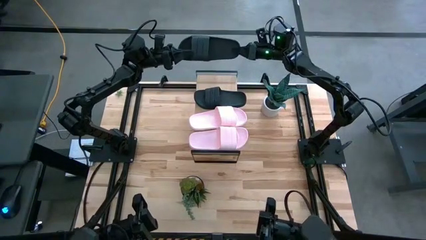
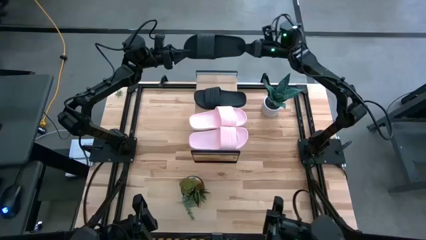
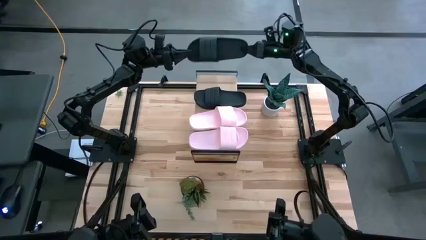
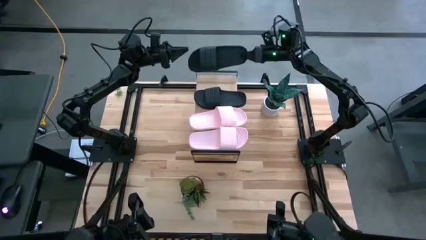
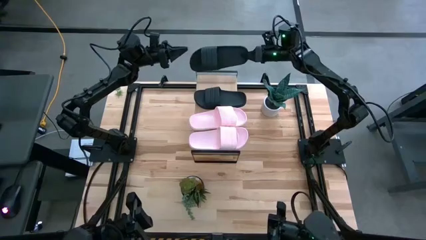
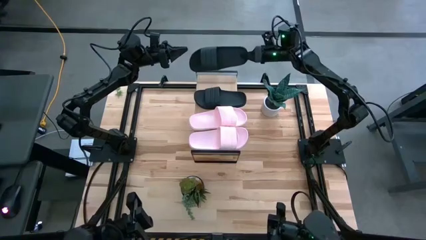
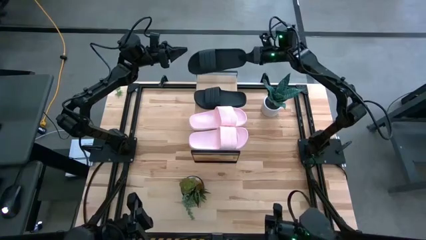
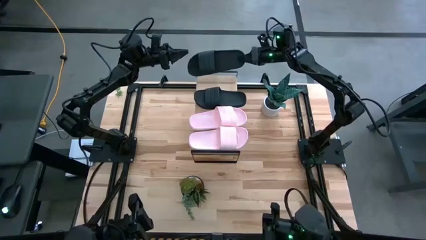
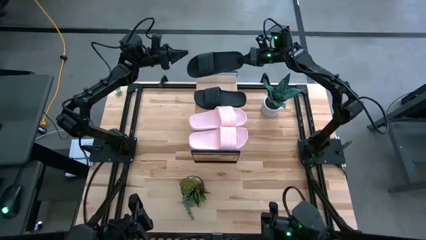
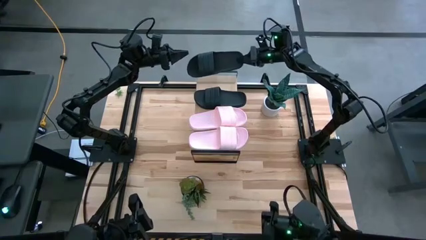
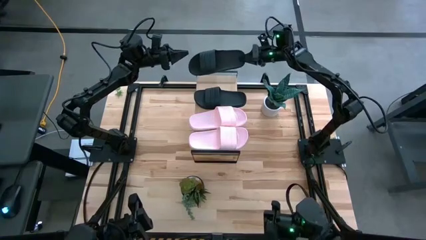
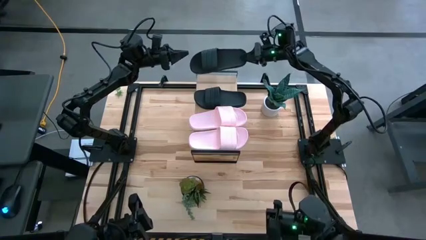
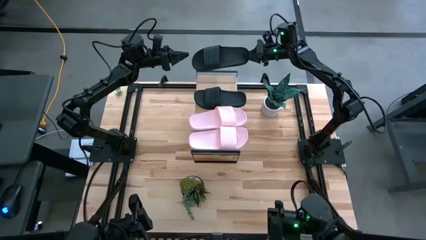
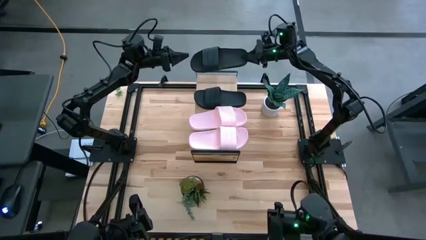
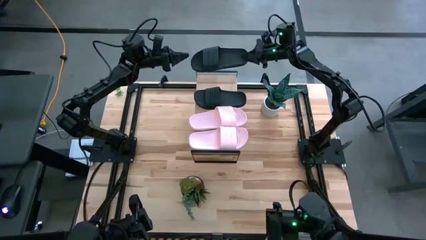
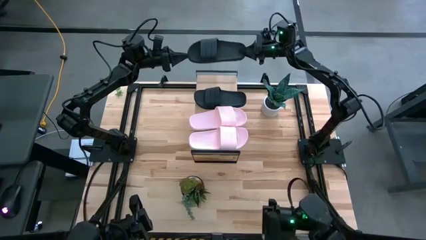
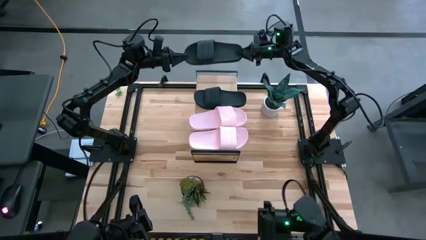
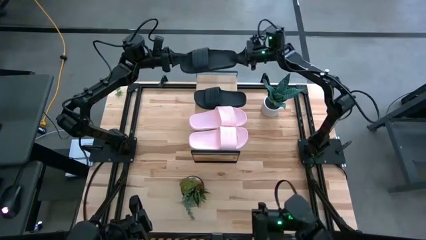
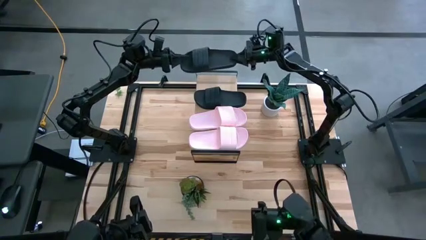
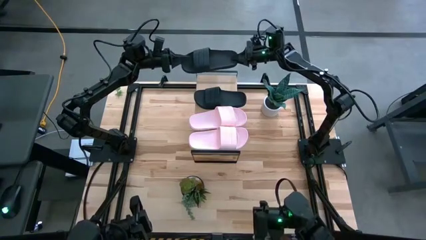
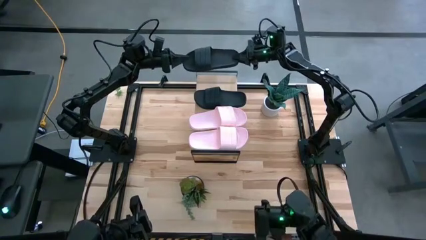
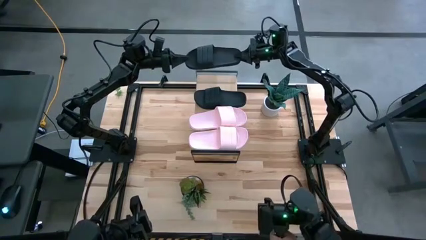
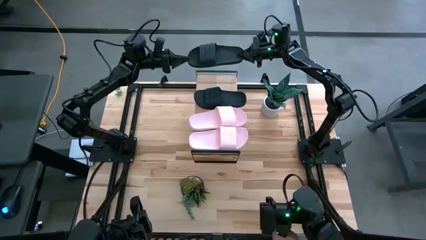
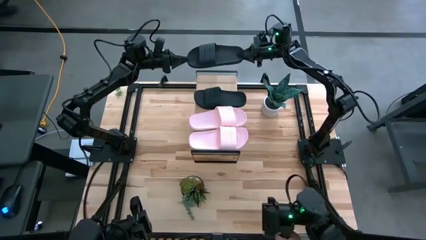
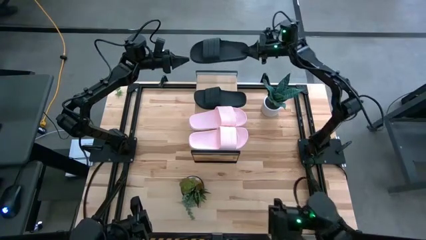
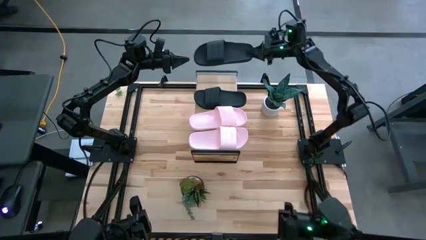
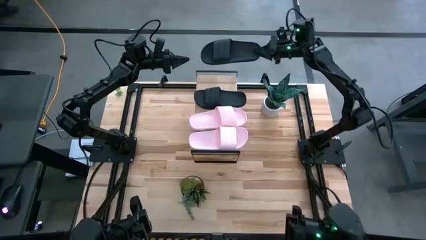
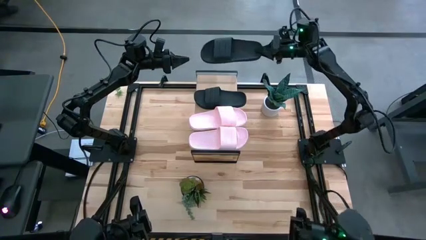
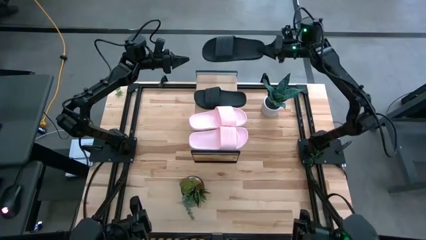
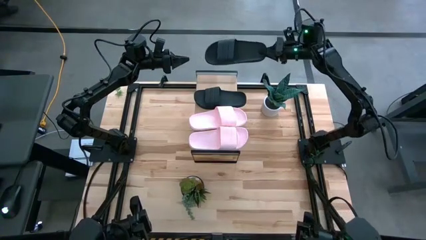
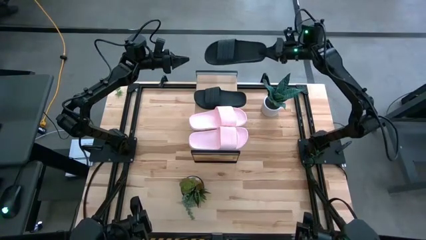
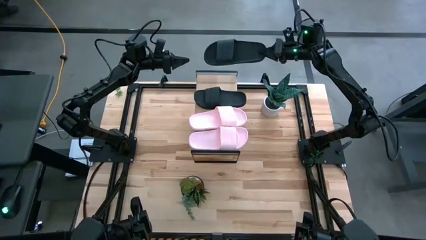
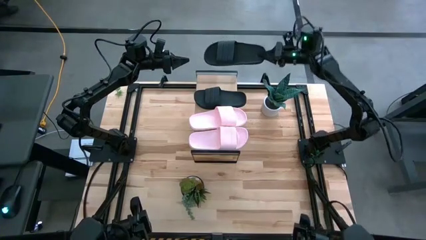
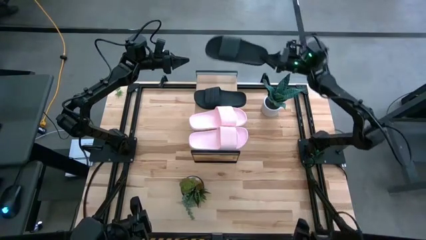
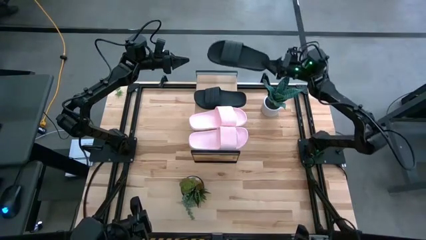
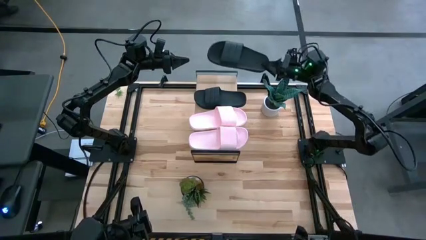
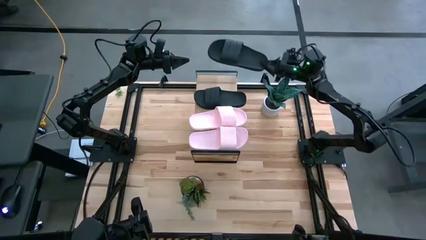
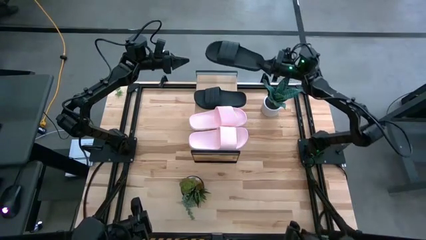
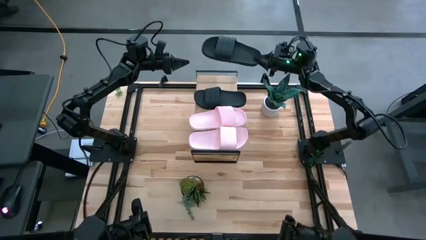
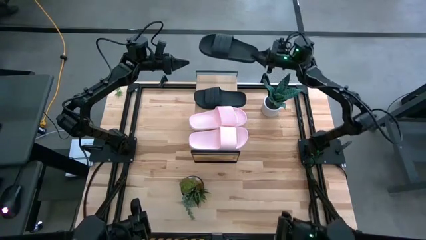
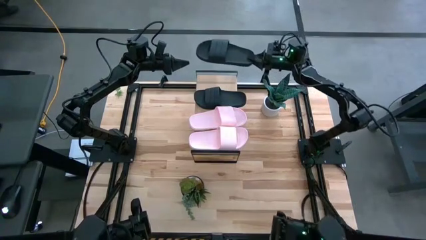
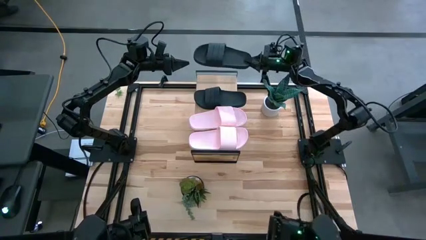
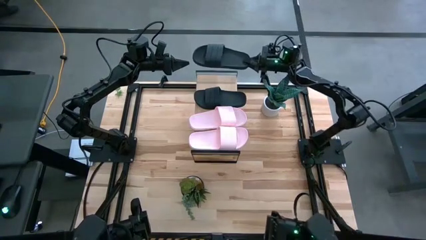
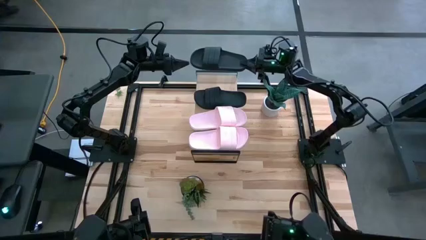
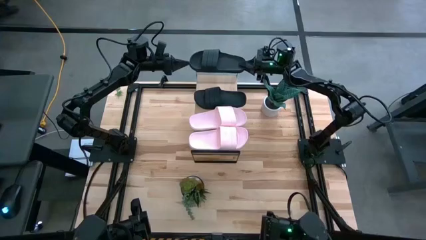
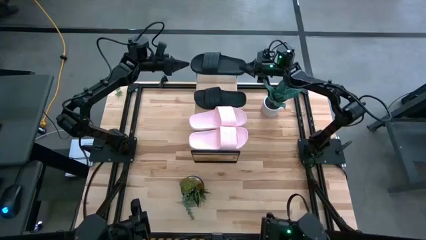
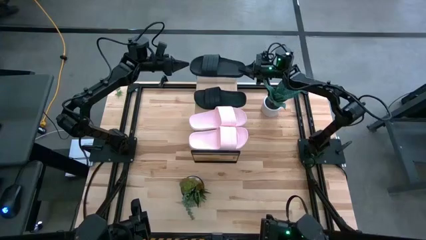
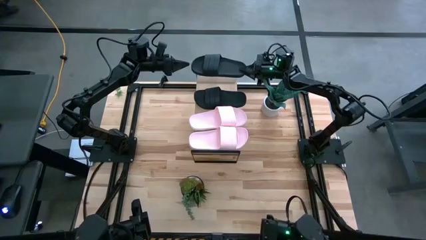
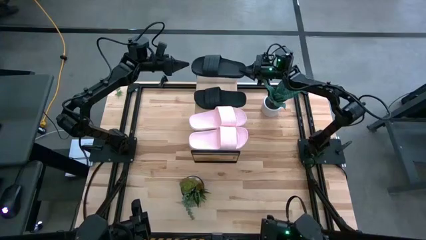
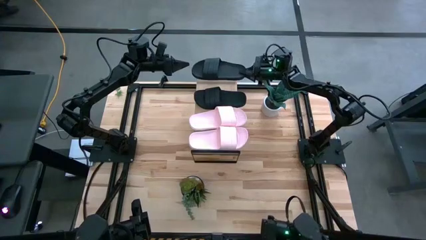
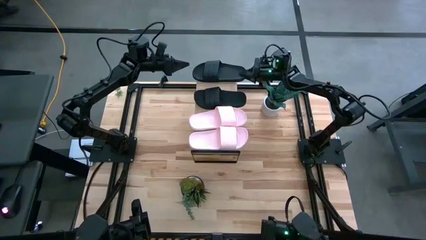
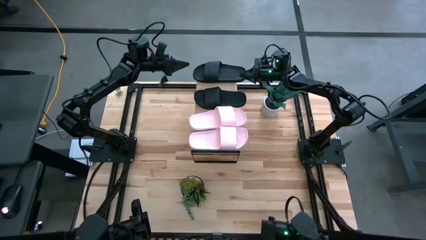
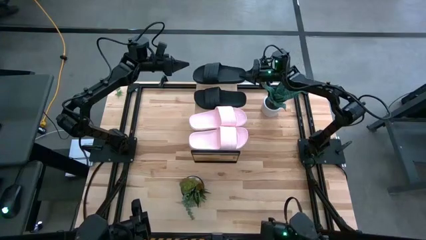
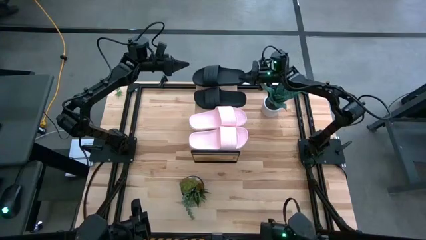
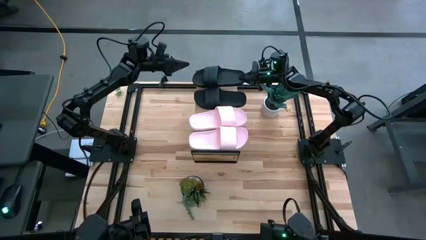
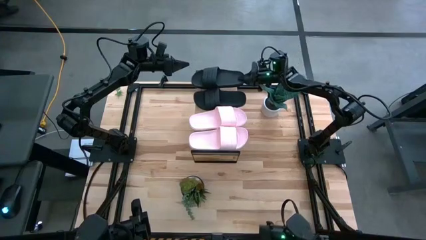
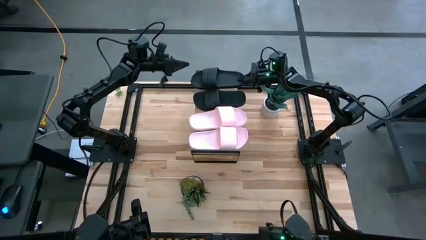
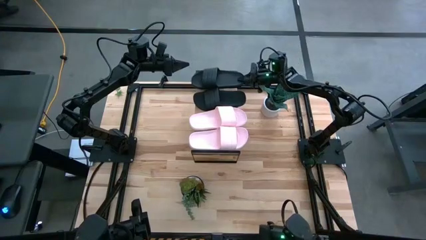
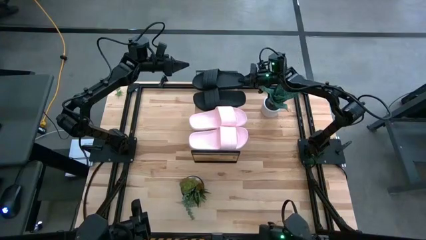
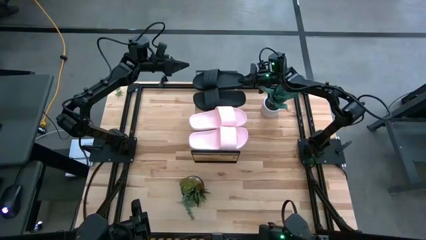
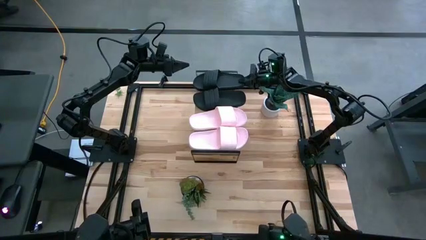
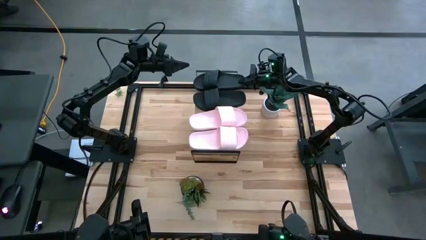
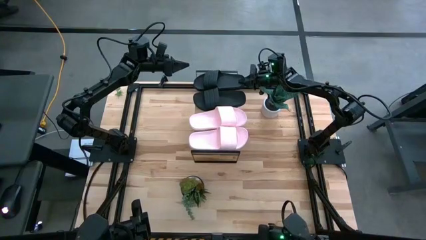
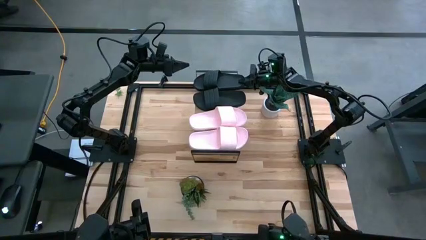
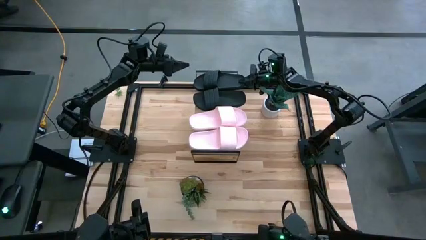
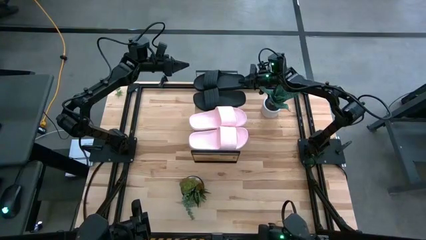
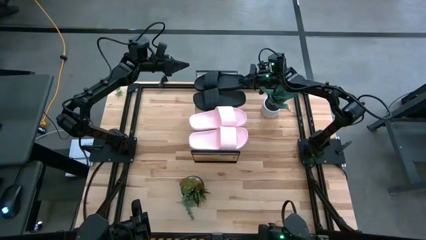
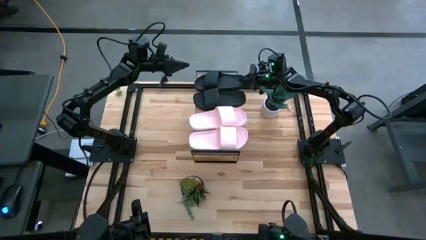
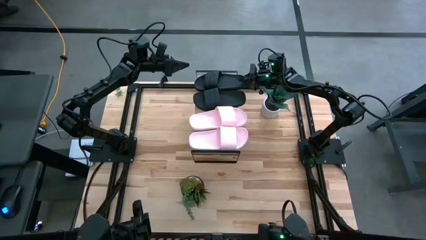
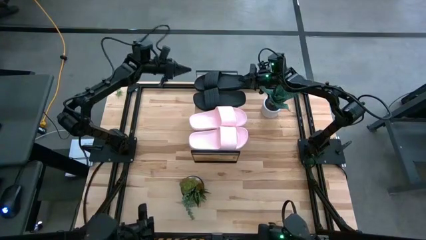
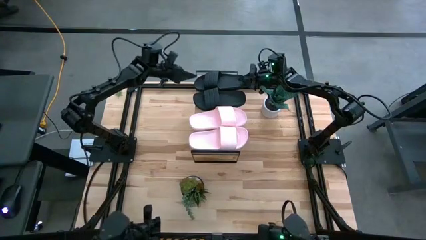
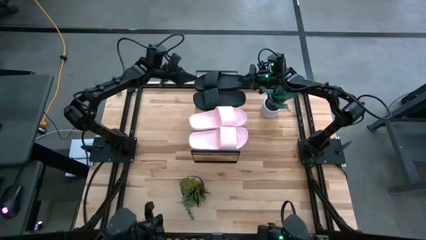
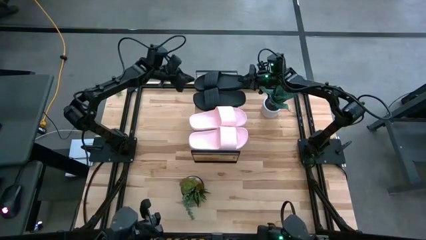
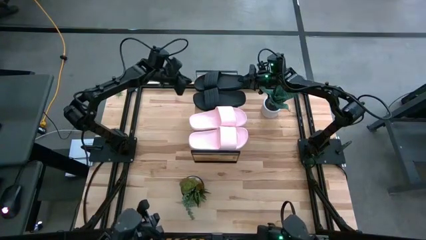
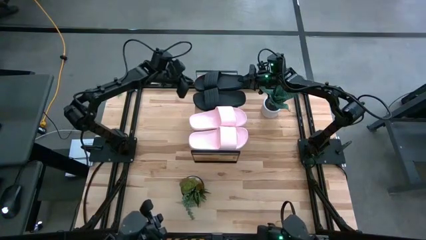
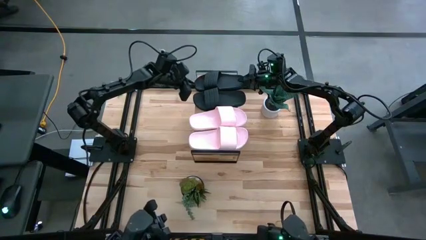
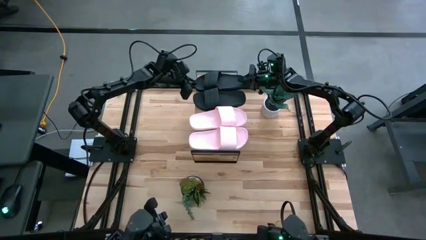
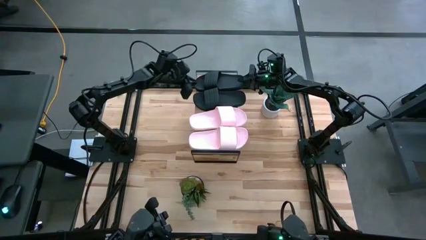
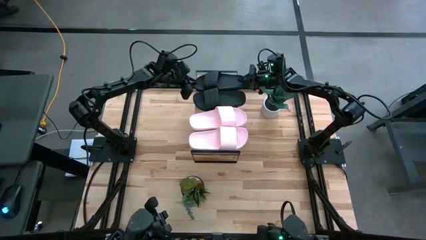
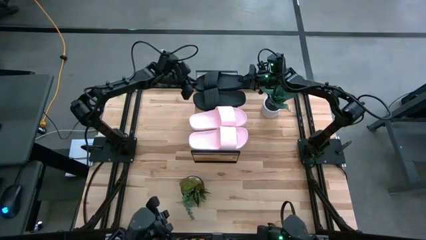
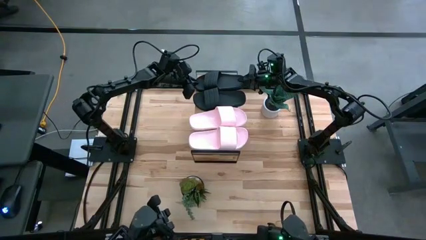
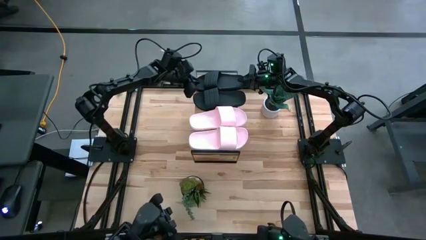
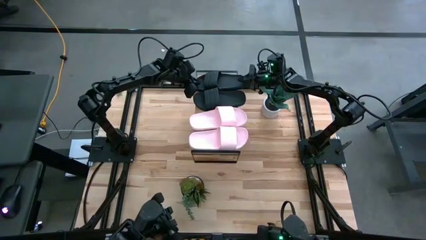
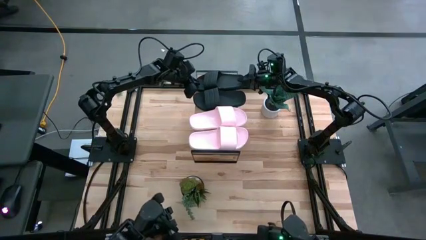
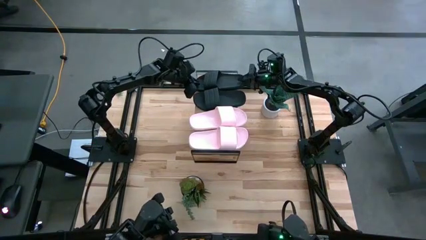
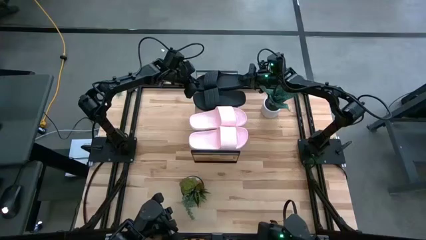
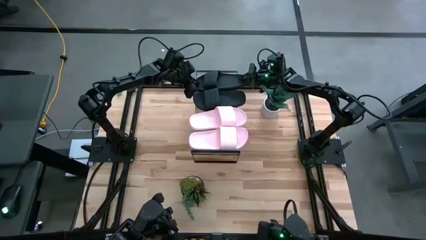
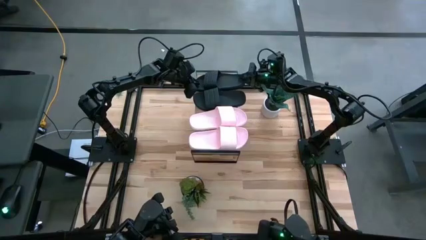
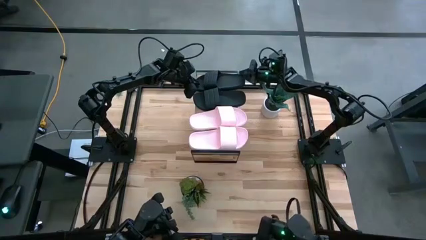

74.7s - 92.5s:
Task: Pick and place slides into the shelf
Put the black slide on the shelf
